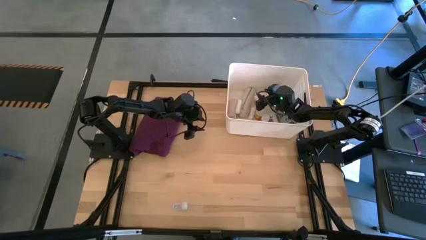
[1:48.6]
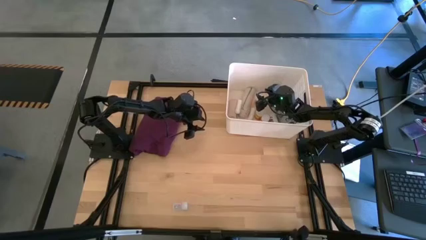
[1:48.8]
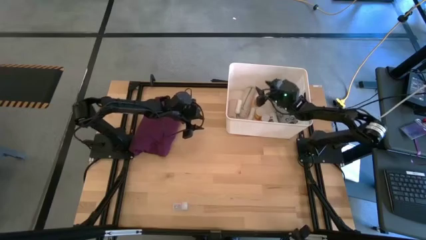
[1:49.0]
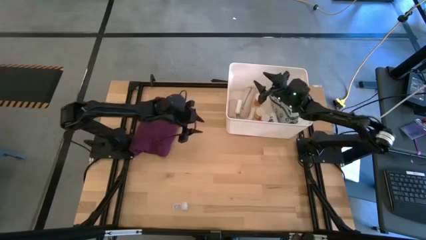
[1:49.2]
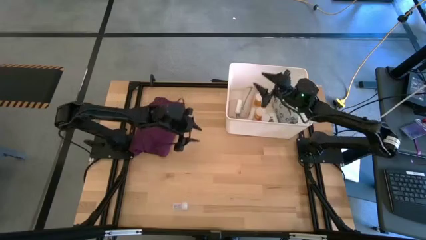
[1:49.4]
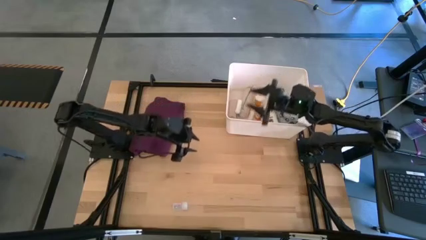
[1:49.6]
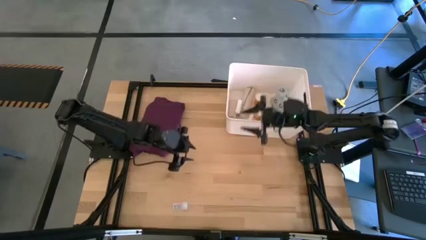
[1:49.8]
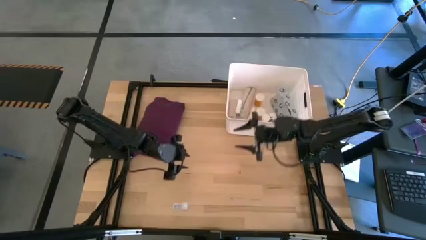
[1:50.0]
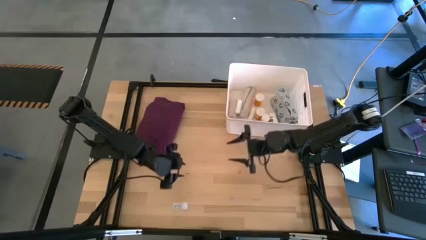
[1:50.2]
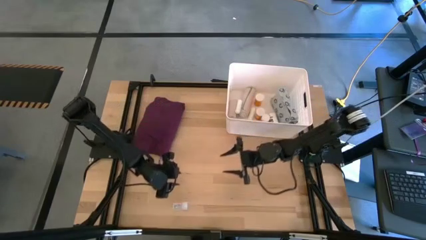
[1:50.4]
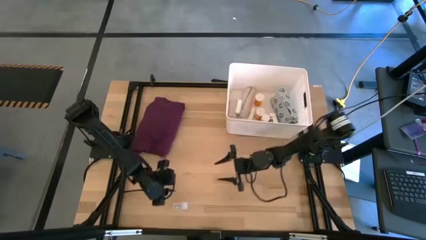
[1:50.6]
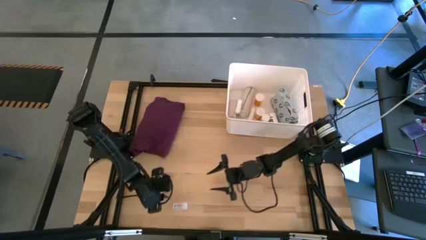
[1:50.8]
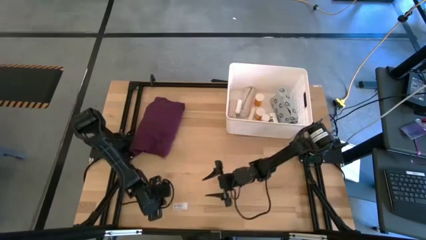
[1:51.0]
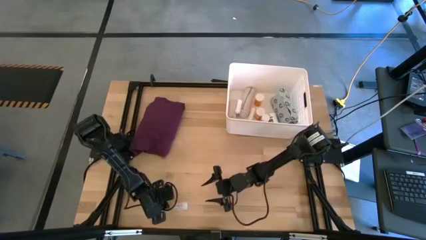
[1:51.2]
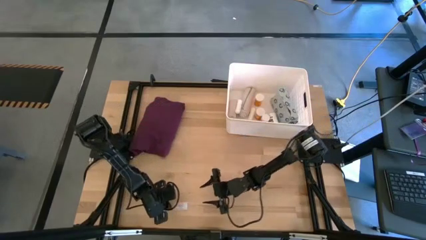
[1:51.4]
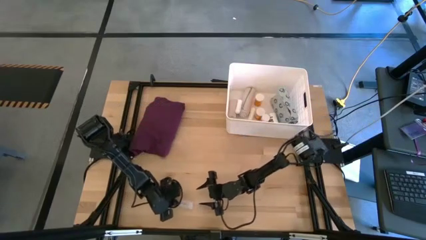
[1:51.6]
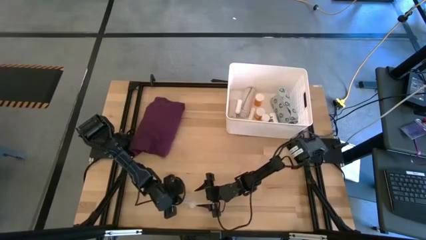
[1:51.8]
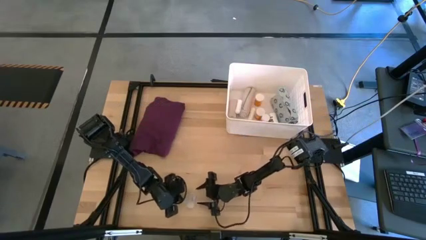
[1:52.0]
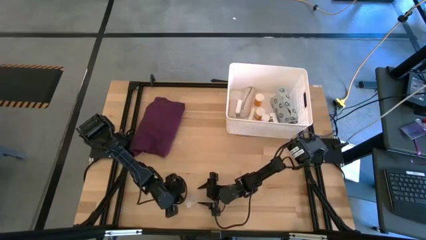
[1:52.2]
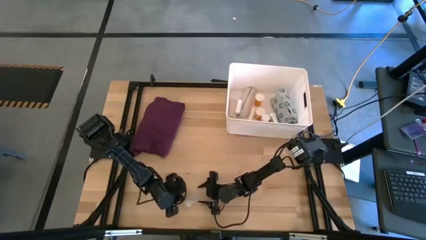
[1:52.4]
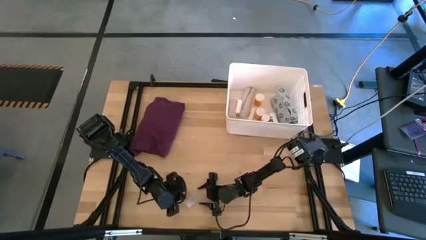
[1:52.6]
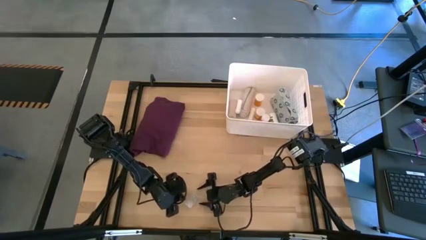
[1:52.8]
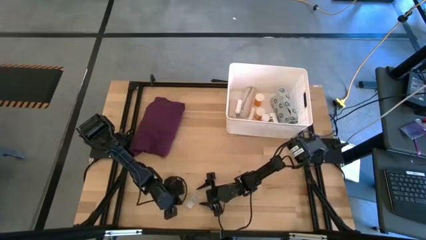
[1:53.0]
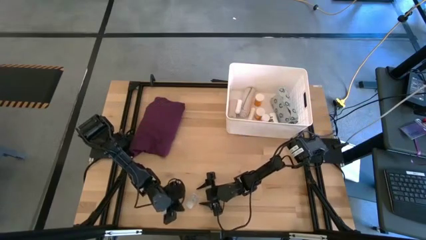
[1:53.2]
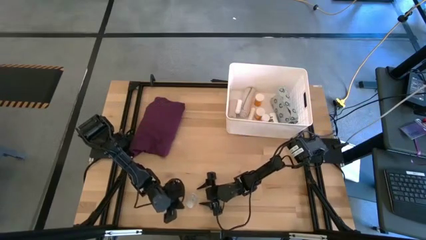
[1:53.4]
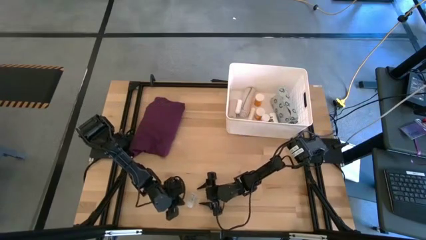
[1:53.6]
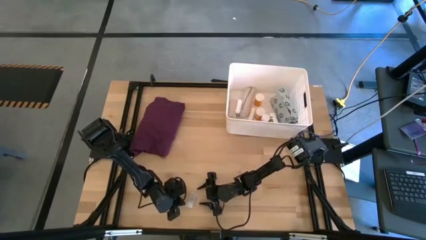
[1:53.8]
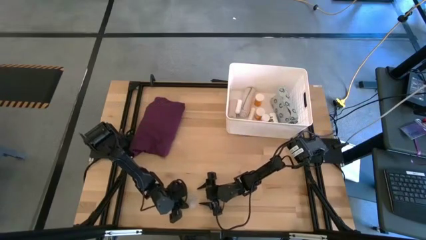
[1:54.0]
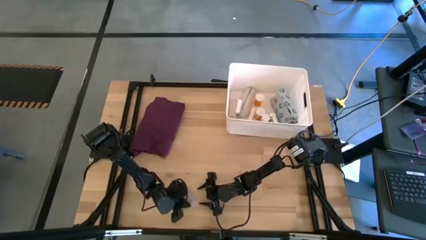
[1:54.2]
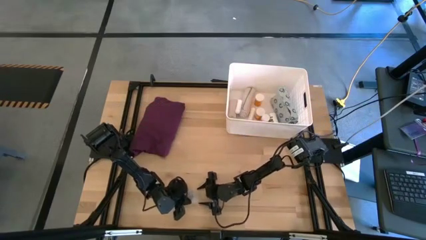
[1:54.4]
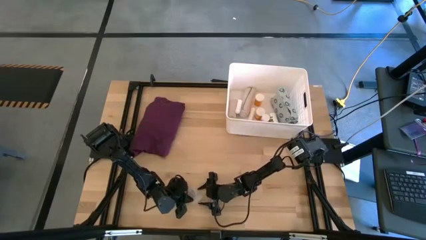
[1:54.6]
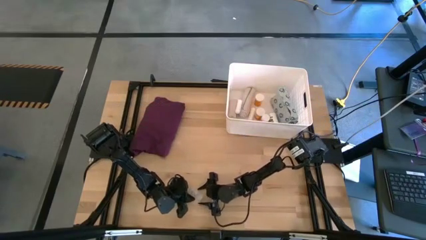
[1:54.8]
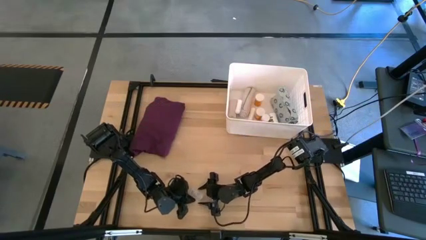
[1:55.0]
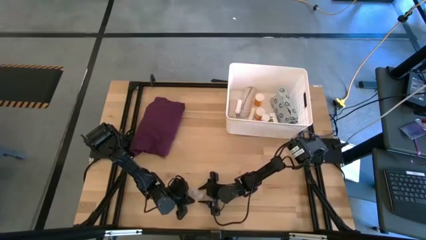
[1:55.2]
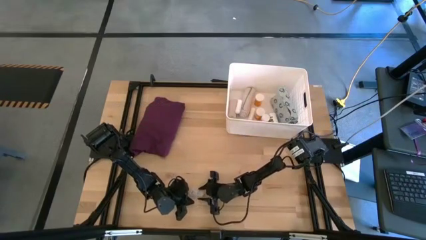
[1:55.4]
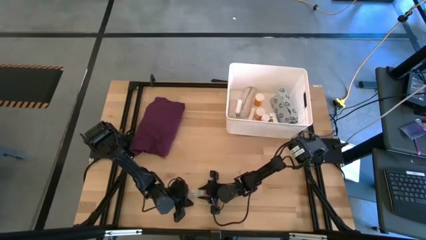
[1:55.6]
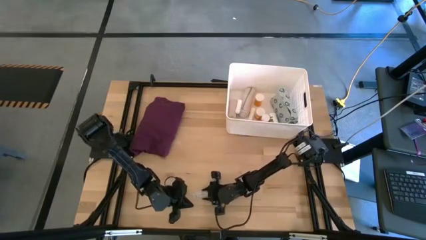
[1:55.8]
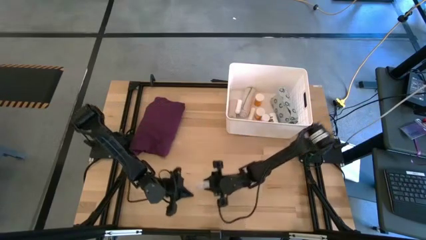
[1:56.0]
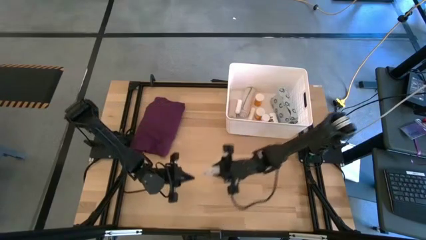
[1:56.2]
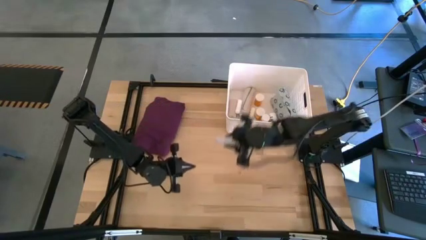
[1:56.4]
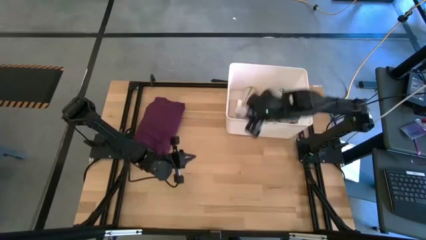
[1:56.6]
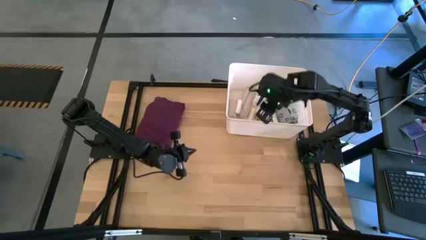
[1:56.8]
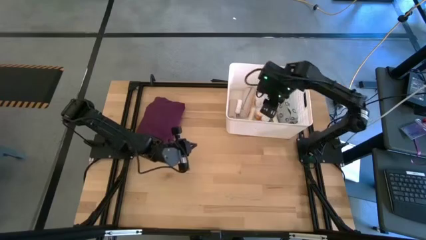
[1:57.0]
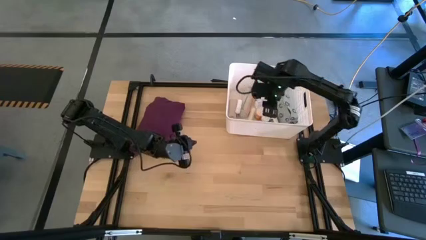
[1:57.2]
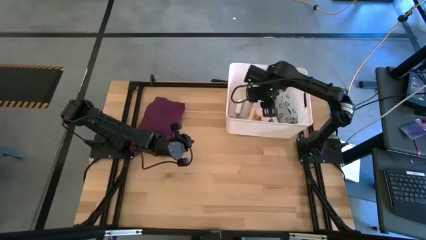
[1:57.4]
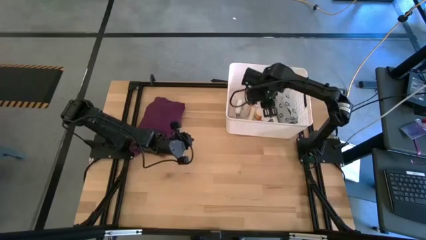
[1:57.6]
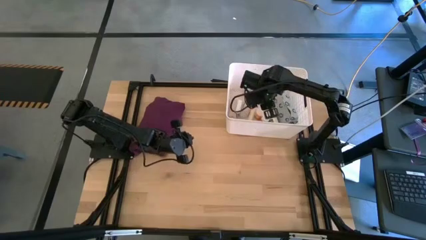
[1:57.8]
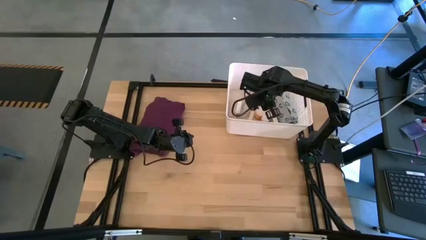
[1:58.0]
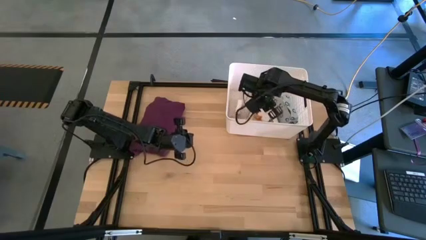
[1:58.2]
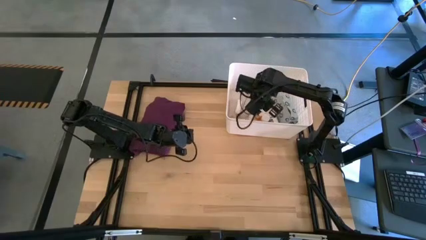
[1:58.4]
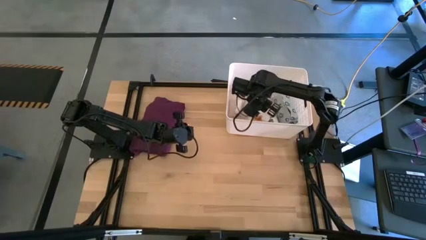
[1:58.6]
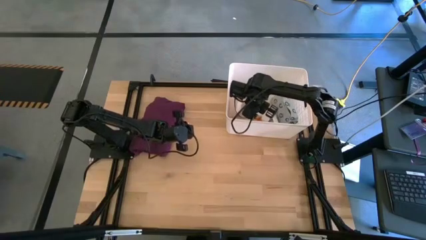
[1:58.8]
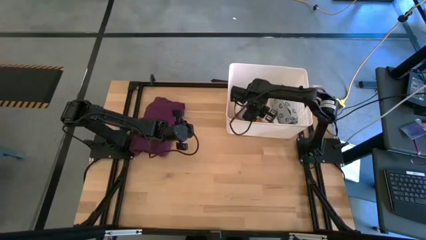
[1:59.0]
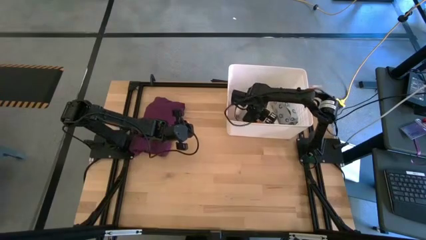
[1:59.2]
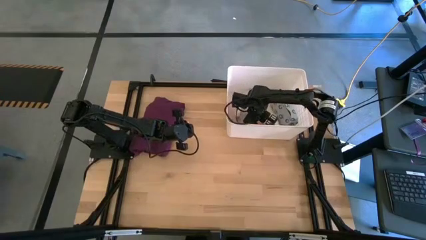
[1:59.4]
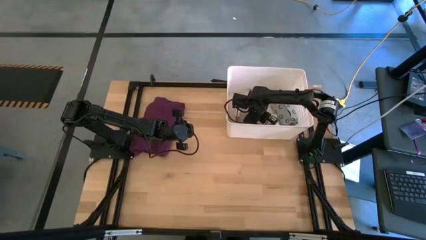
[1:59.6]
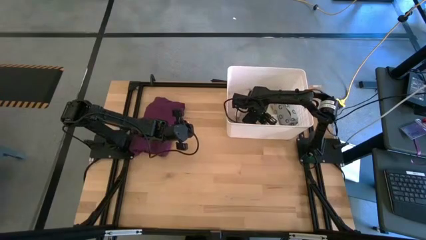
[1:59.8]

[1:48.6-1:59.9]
Task: Pick & place medical supplies in basket/bin
Put the transparent pill bottle into the white bin

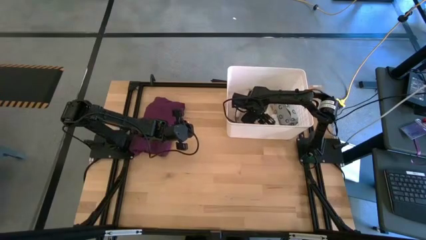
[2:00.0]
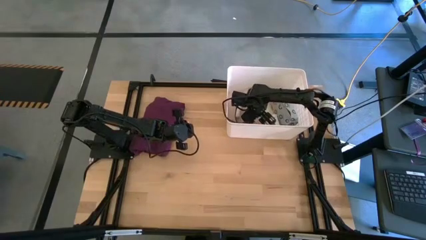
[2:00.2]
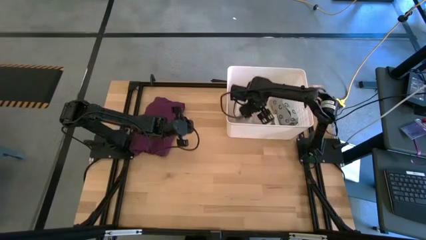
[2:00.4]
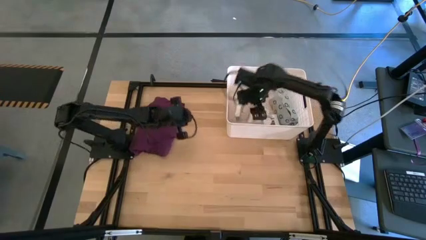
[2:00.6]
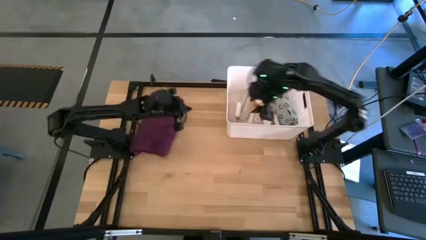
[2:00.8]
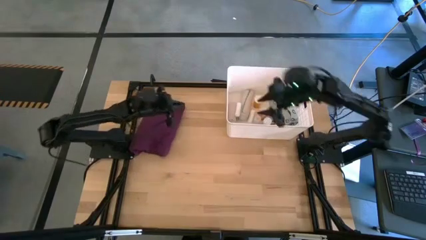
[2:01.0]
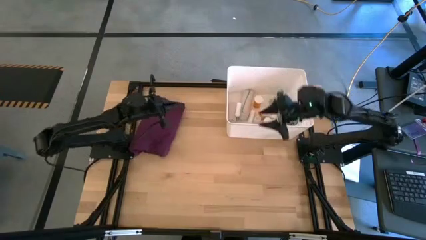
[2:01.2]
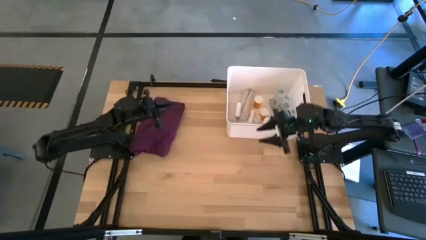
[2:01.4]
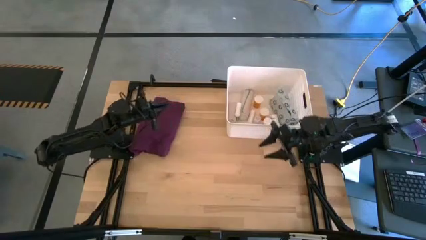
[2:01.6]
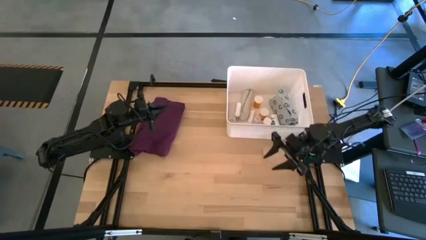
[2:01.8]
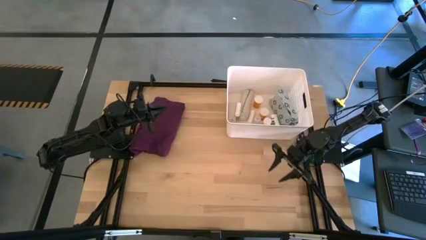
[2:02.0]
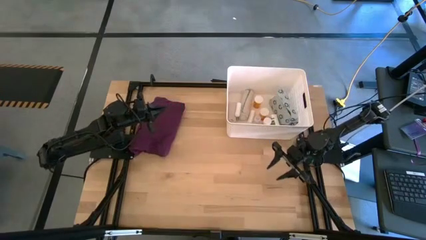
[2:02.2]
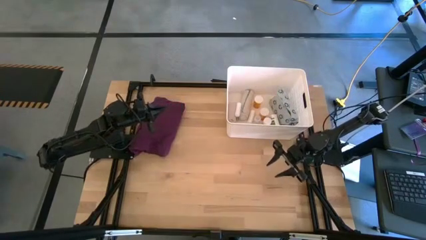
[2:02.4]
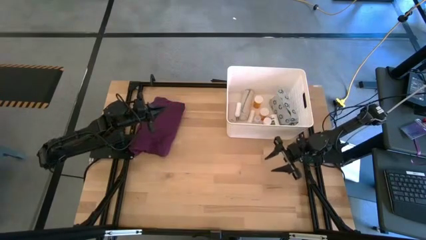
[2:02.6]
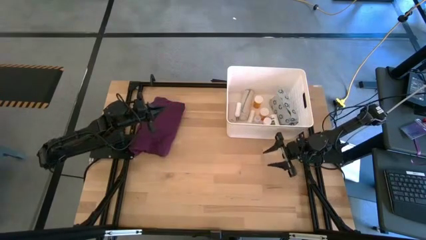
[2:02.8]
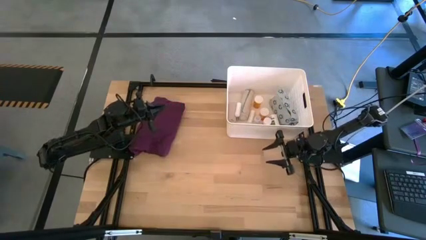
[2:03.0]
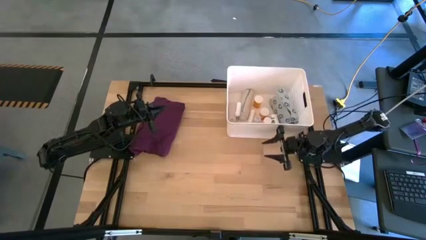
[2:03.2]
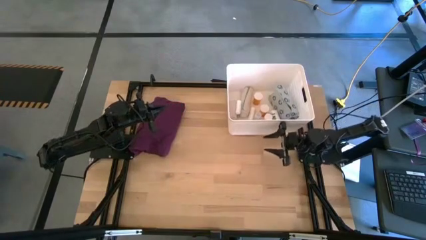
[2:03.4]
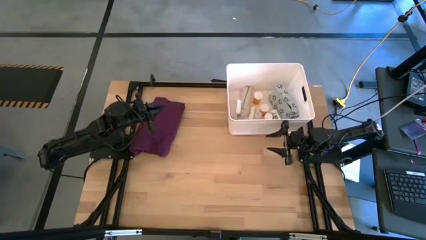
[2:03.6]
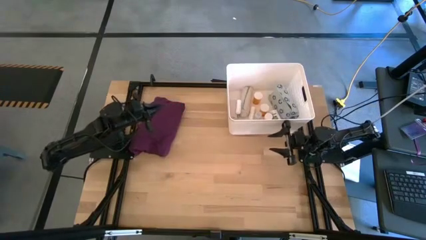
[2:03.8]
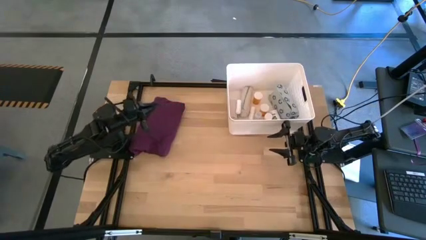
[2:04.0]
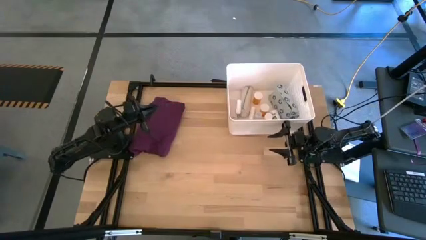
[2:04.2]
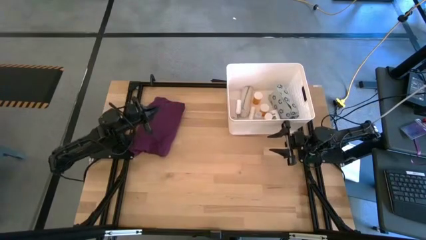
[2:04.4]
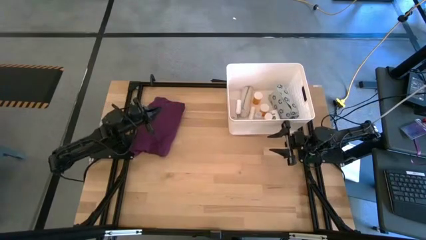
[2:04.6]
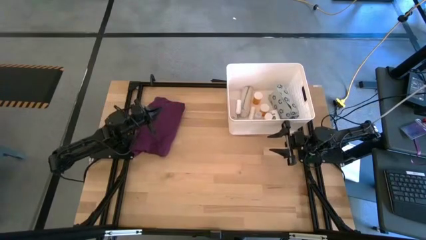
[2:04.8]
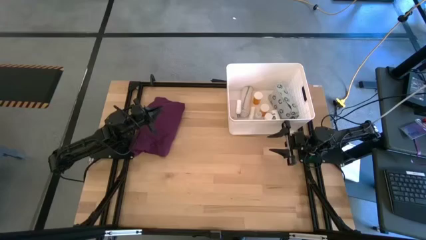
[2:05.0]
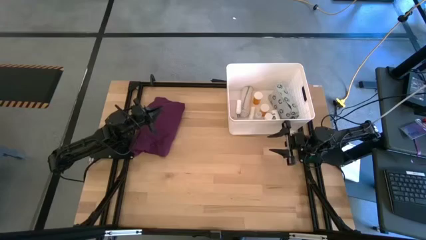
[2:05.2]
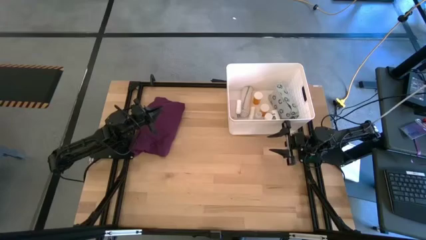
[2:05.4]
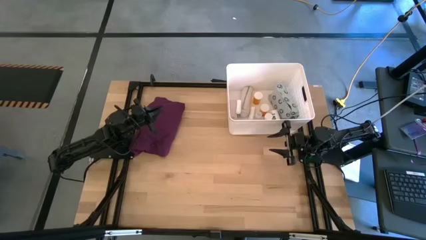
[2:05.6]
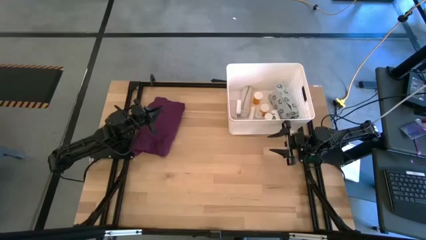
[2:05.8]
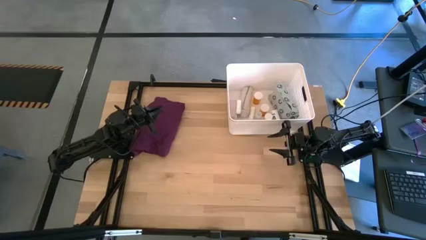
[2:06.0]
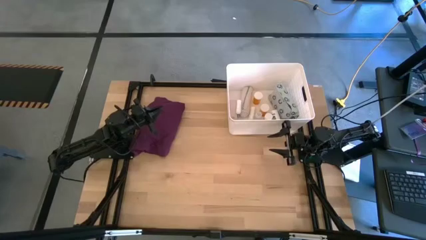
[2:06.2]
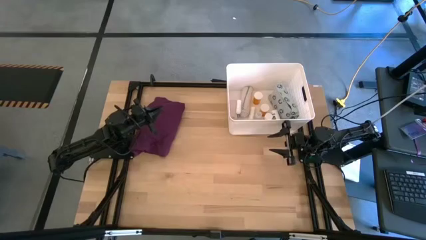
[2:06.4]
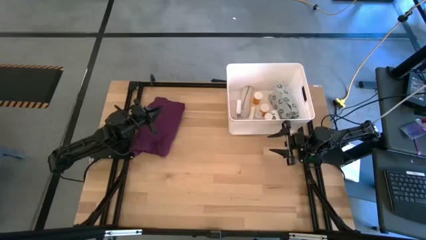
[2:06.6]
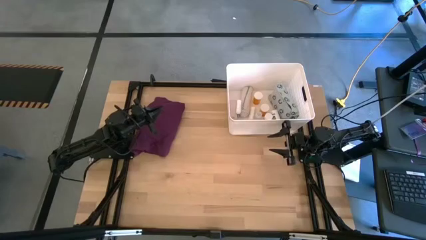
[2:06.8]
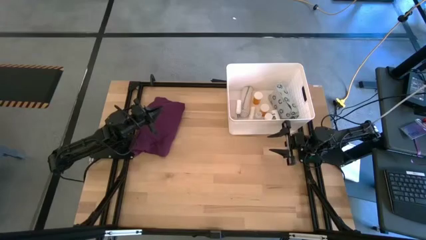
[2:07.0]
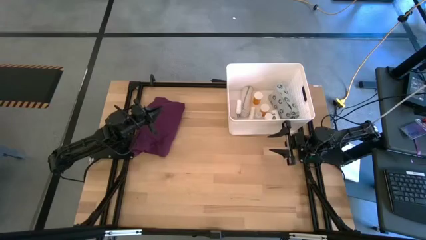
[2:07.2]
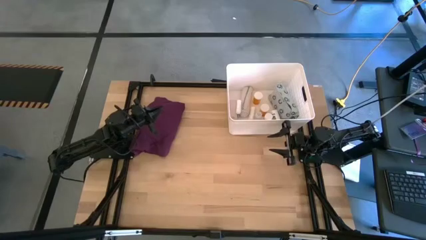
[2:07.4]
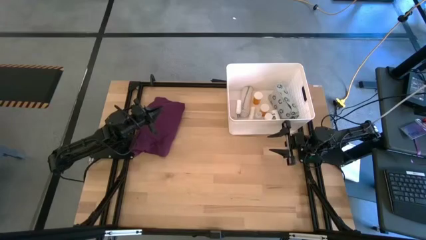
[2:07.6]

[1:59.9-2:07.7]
Return to Home Position
